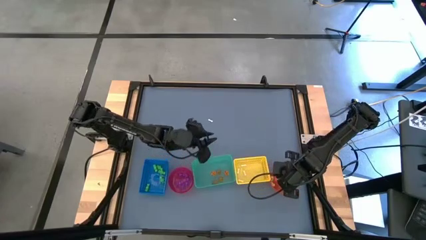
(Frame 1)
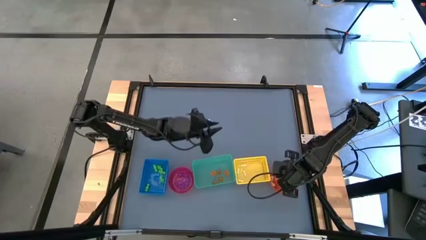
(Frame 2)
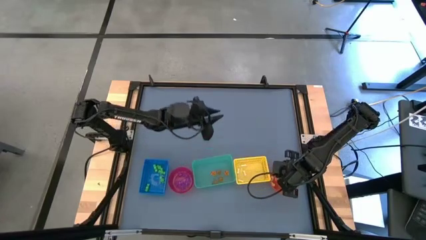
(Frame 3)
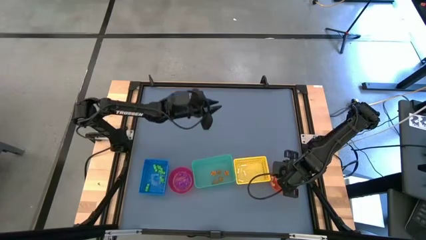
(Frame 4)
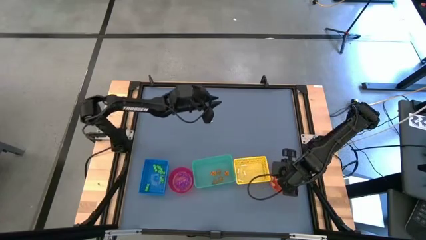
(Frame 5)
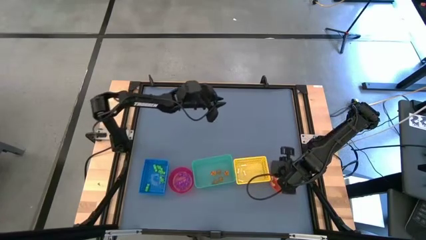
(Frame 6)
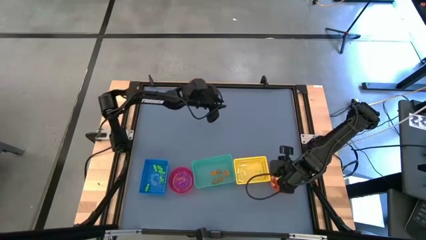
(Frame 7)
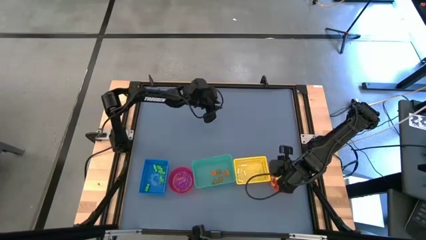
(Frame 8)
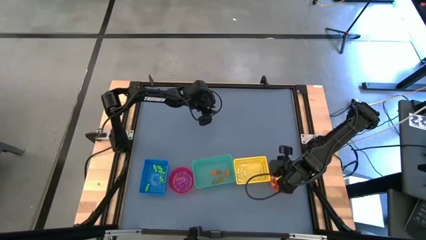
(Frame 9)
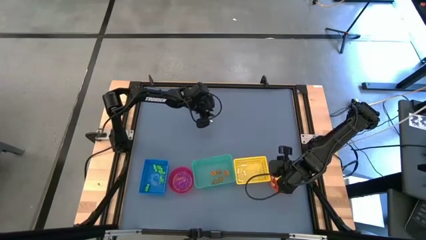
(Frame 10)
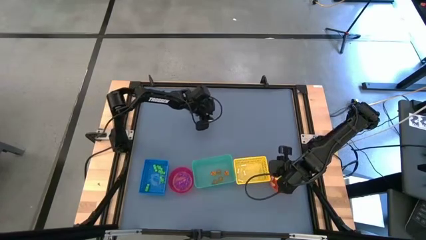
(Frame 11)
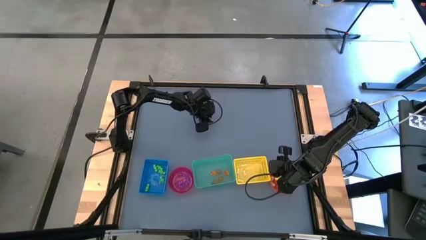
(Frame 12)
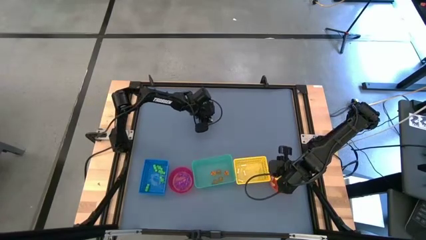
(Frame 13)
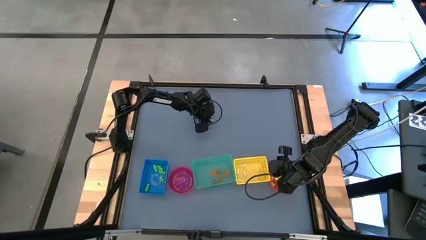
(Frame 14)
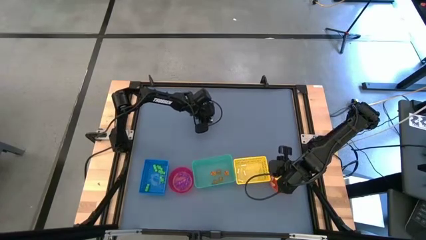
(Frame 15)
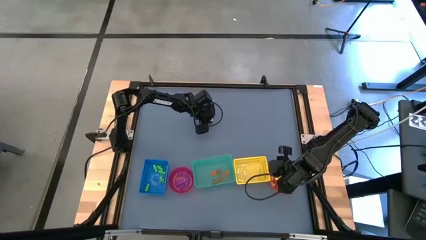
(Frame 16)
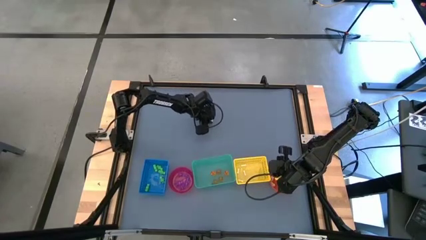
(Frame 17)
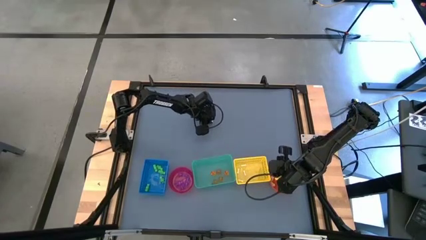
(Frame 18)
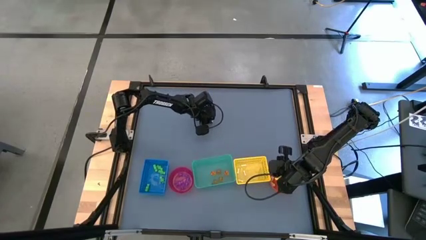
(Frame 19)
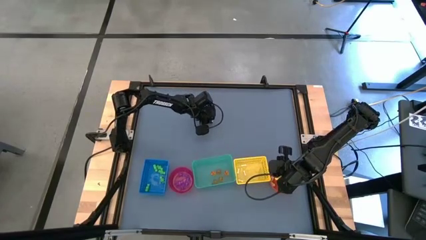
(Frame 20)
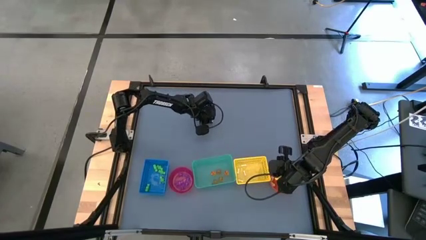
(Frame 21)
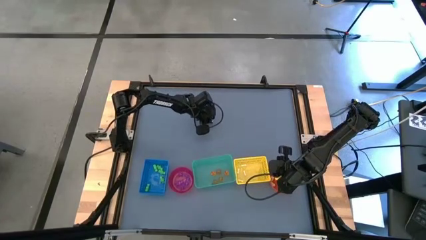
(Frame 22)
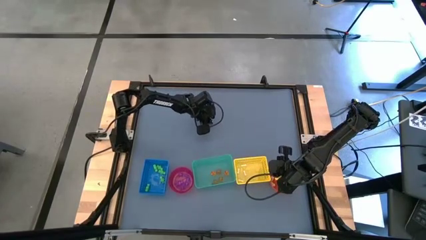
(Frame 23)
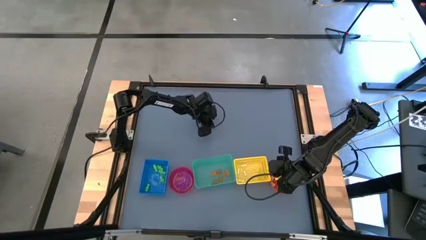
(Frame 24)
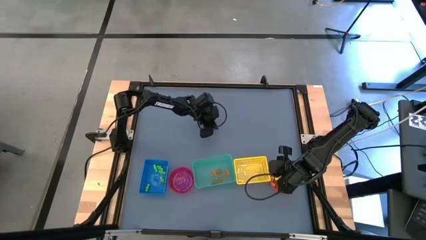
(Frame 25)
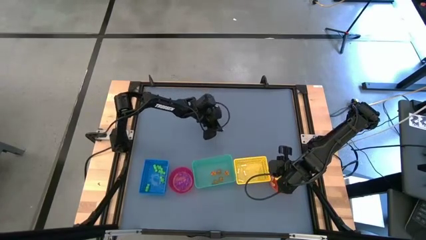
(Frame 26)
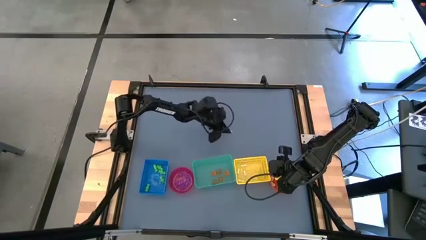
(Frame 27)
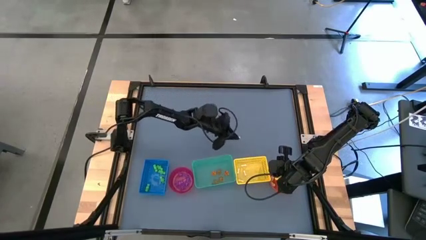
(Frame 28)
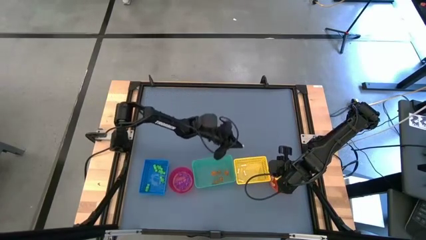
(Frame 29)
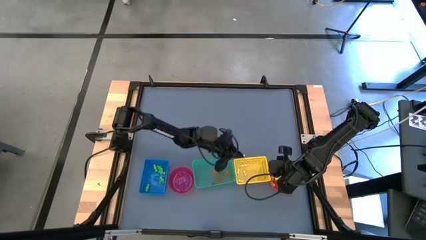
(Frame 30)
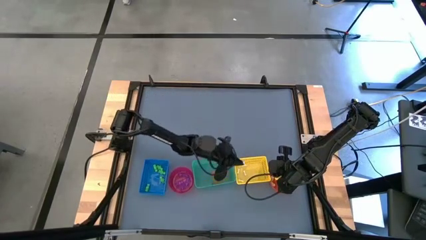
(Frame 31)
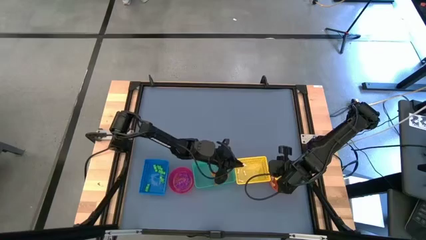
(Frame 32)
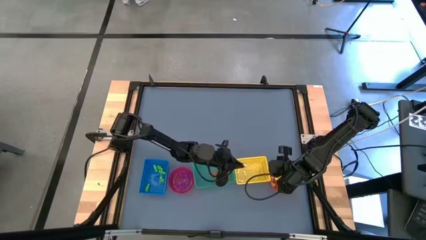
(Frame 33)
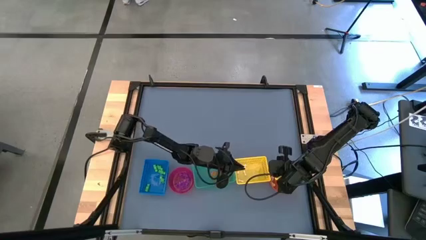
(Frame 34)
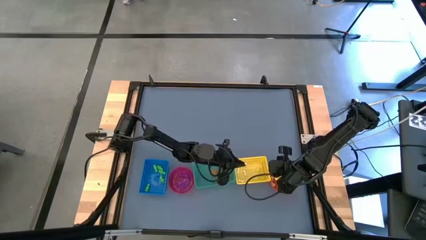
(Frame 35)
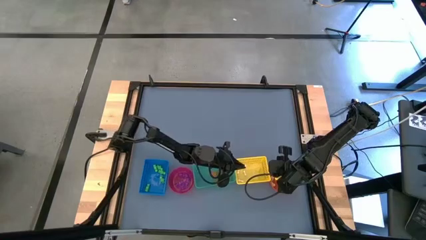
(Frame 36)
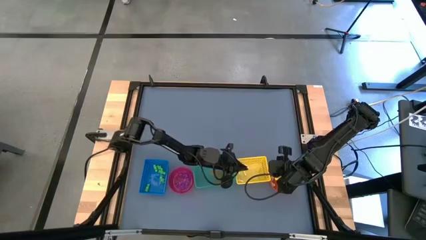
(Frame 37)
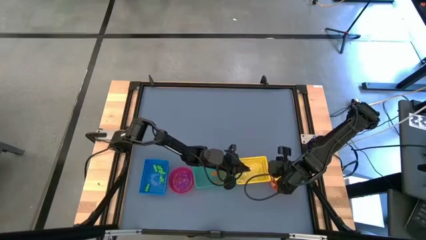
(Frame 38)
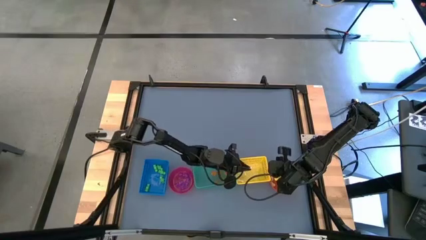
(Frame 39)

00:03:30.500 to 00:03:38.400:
Task: Sort Halloween decoration
Put the white bone toy into the yellow bin

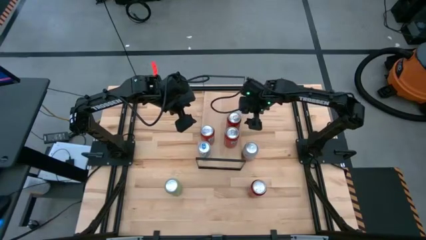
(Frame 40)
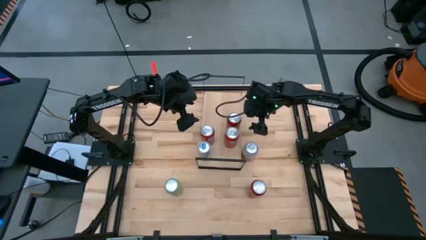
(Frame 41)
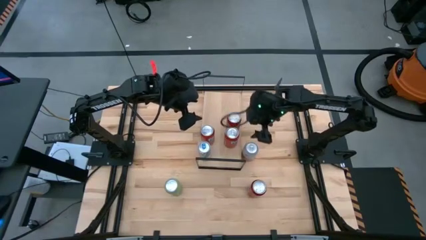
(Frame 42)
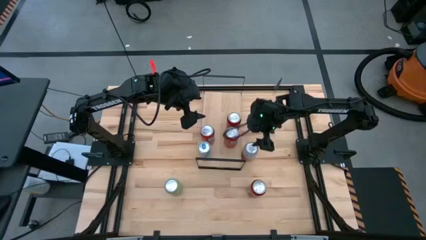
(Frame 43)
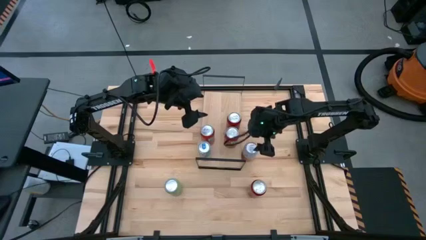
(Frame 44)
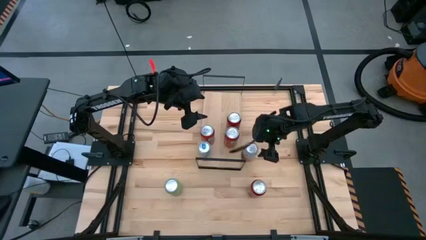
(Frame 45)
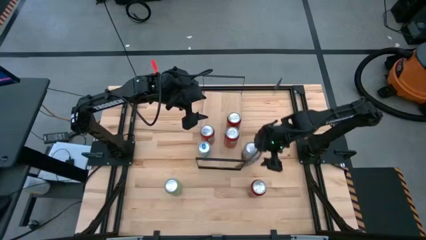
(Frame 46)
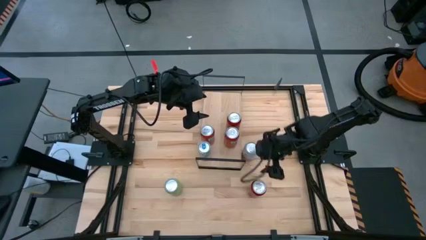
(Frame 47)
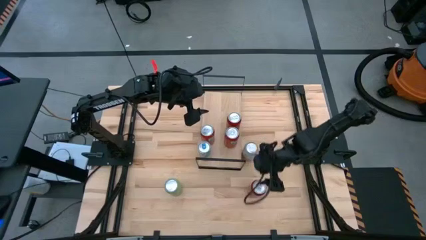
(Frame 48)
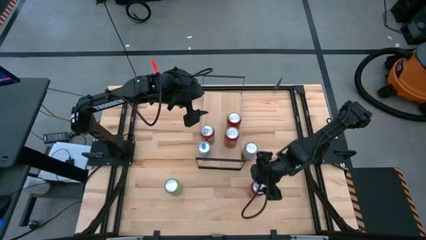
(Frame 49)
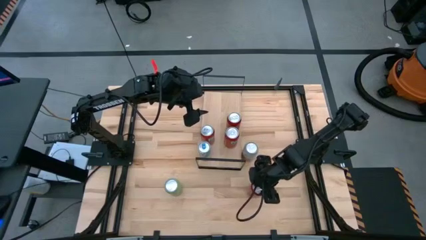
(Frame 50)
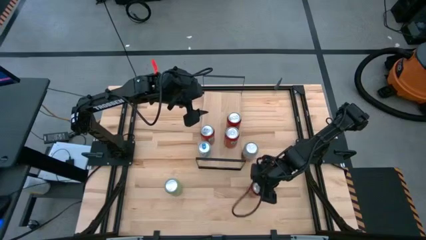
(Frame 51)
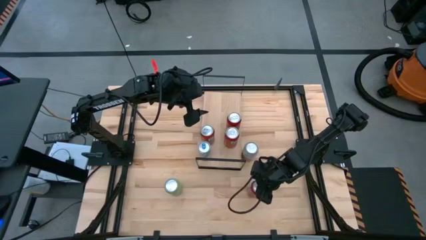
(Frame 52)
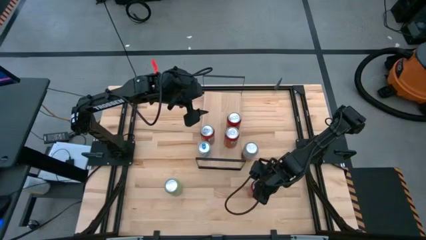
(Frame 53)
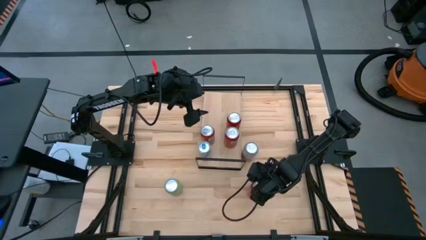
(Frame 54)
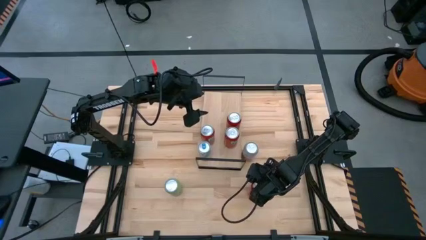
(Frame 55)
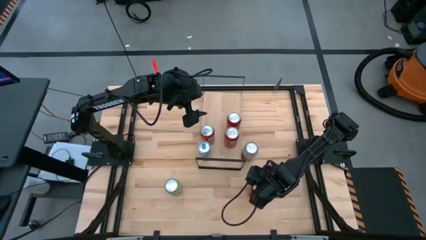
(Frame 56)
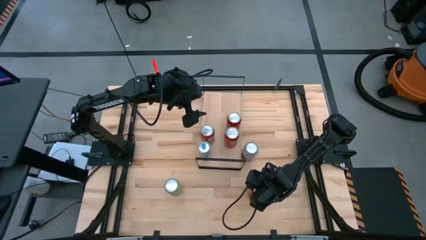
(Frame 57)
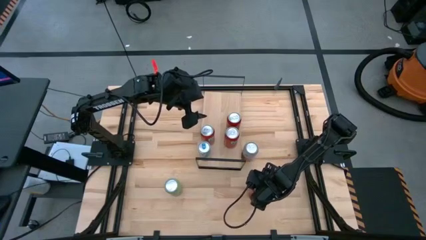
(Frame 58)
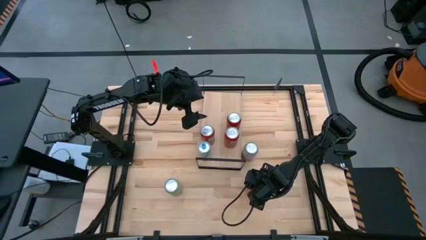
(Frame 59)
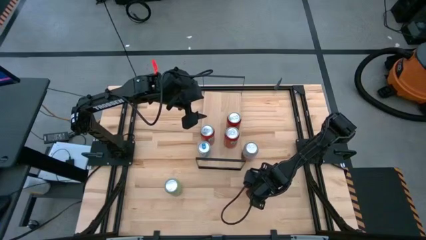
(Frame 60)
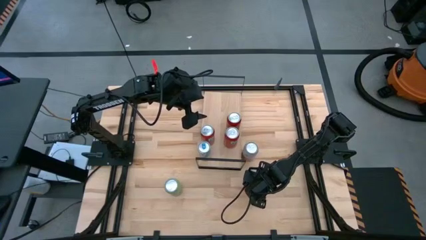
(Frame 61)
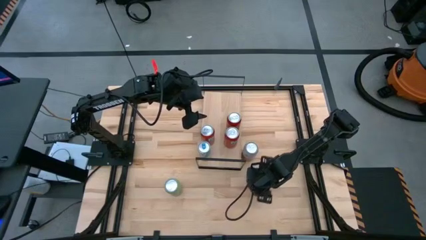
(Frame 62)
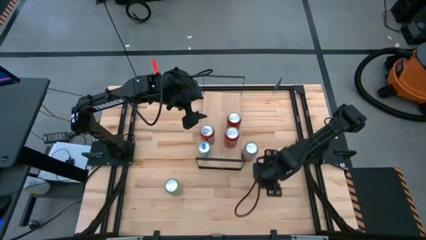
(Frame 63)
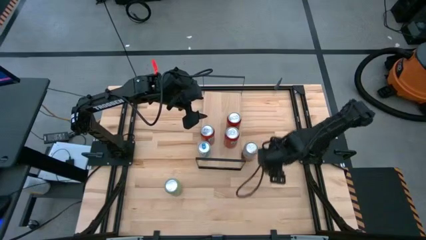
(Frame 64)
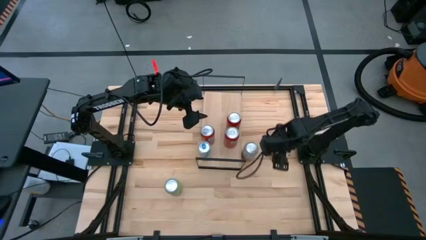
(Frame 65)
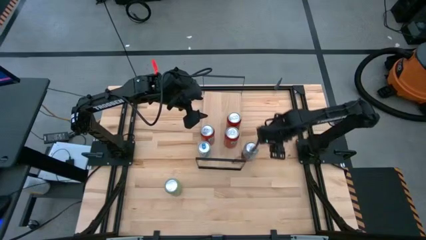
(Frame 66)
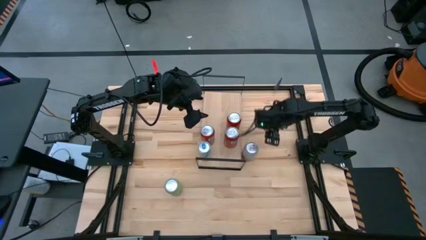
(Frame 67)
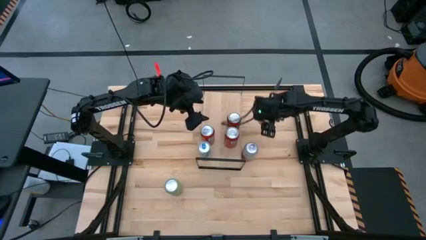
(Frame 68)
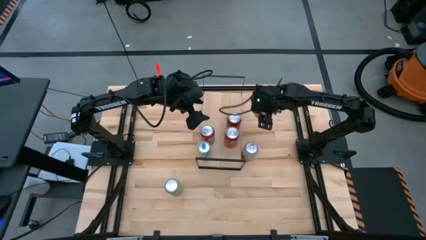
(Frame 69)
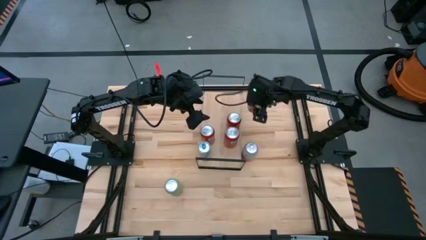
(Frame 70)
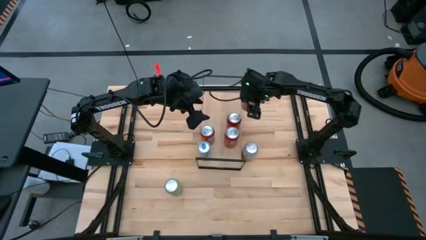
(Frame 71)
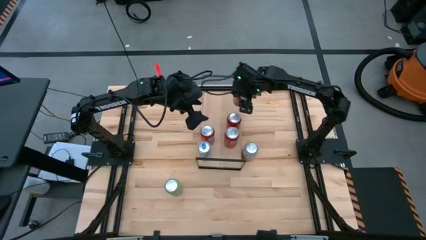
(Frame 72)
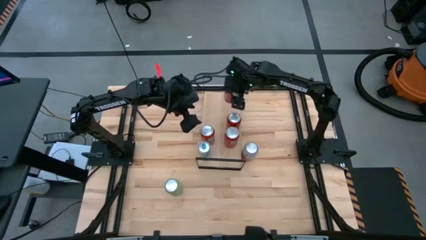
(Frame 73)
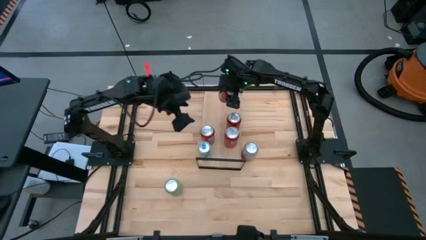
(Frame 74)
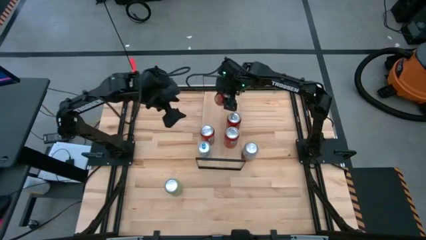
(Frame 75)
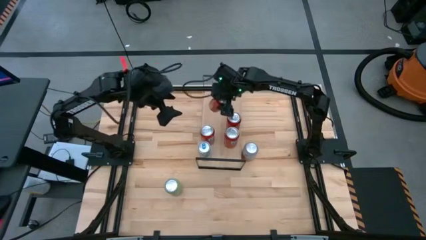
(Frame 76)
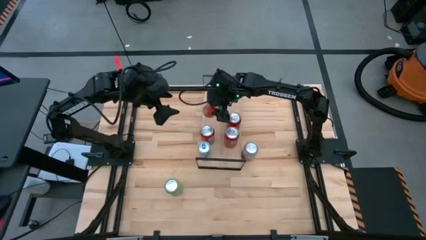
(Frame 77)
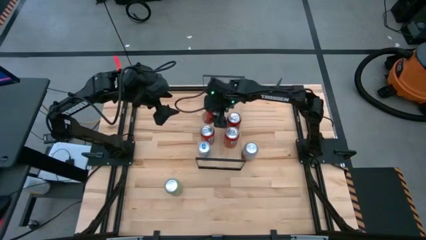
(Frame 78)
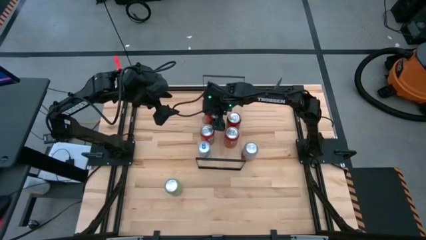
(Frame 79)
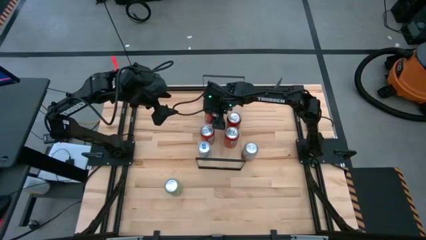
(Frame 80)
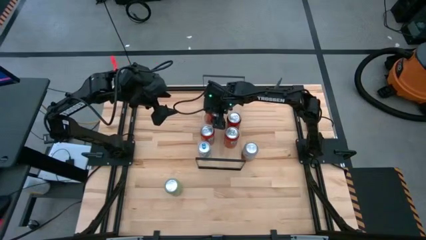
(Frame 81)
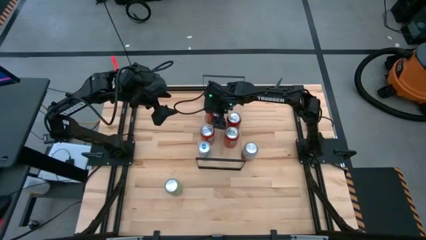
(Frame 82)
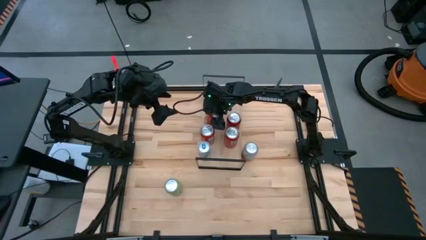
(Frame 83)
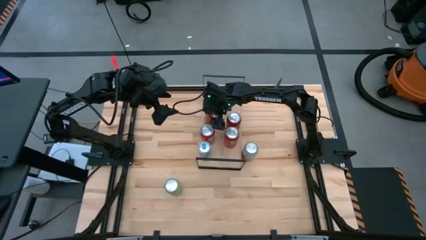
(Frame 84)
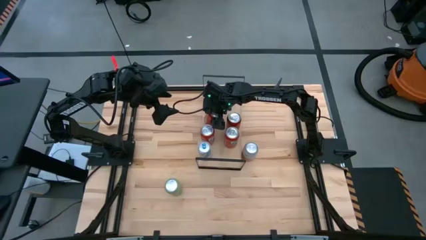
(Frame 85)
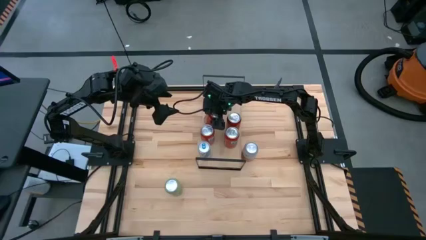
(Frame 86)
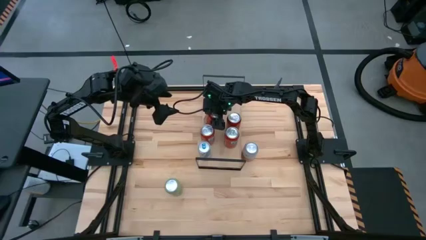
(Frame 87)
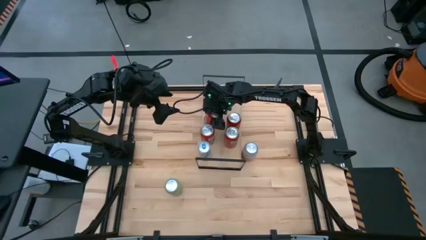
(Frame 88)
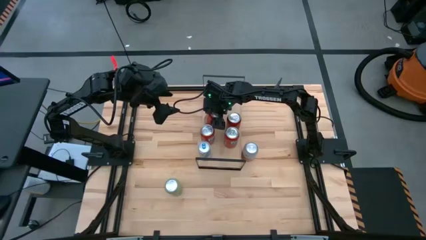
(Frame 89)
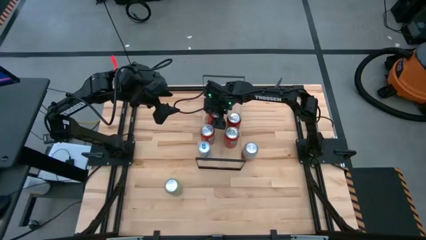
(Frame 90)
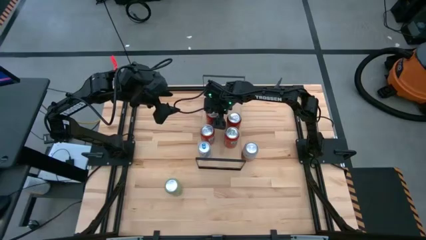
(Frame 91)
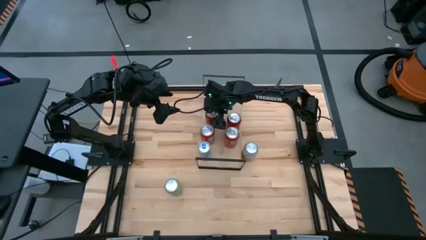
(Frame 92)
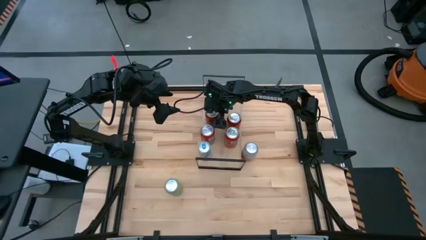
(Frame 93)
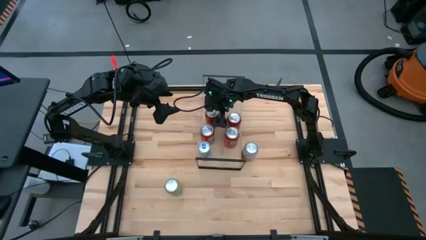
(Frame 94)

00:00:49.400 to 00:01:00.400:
Task: Place canned beverage on shelf
Put the red black soda can on the shelf
